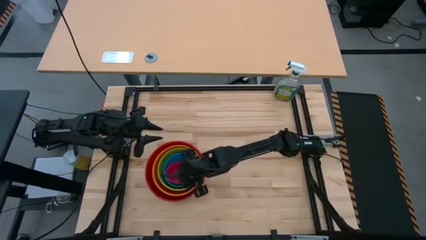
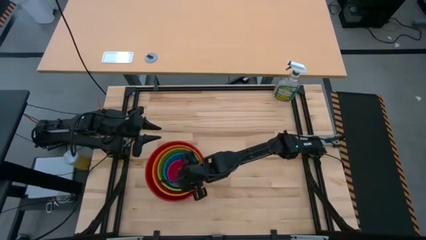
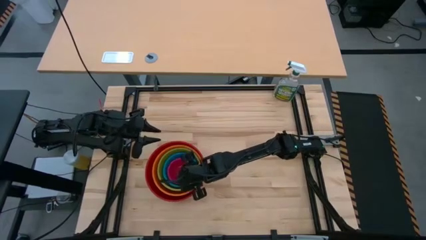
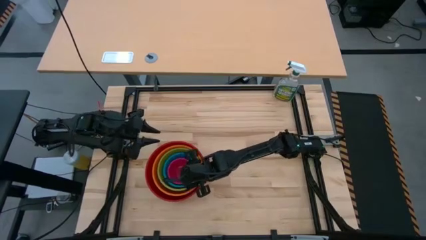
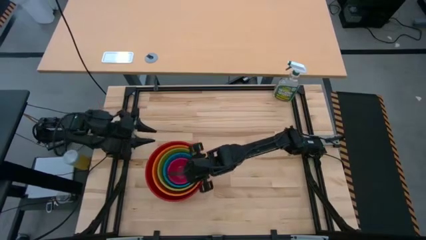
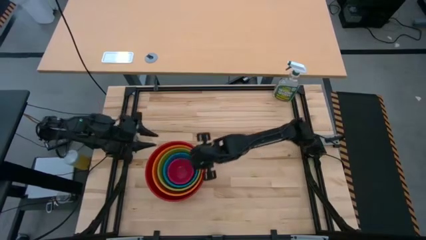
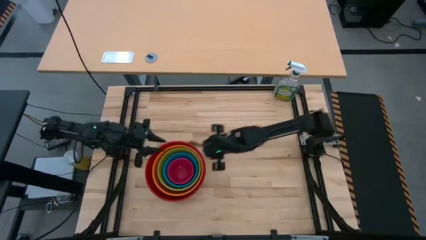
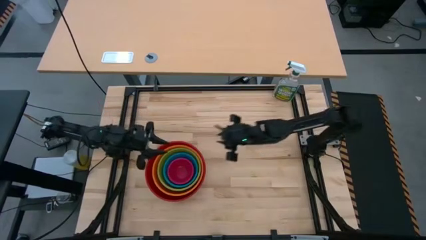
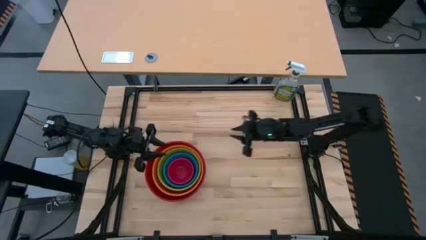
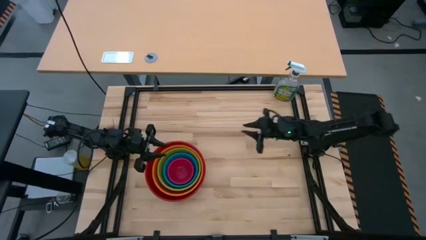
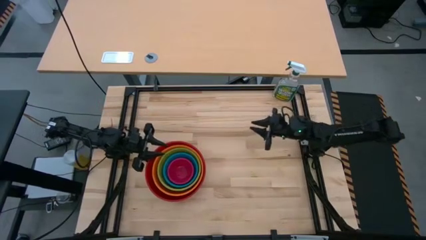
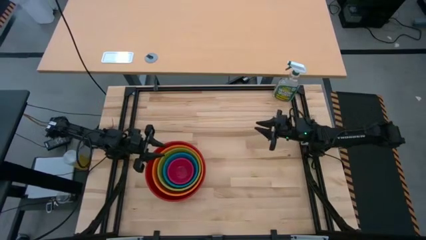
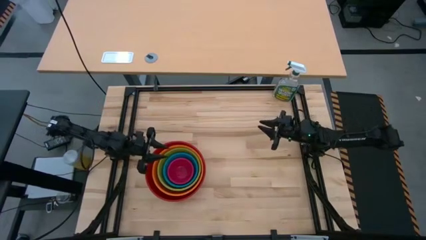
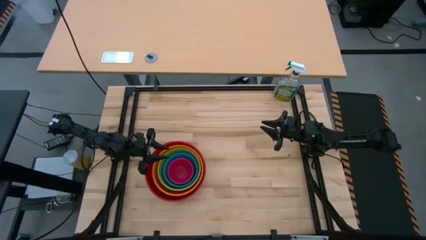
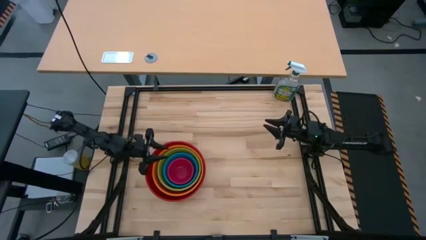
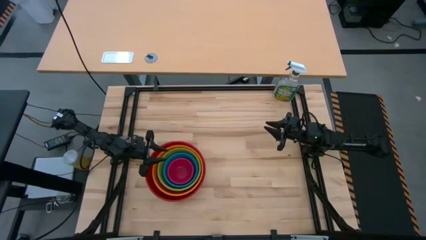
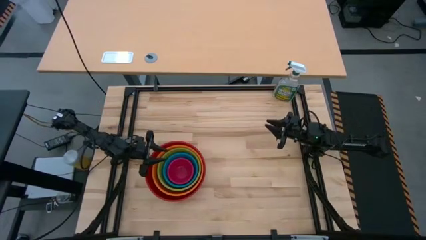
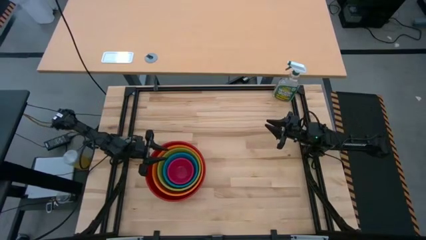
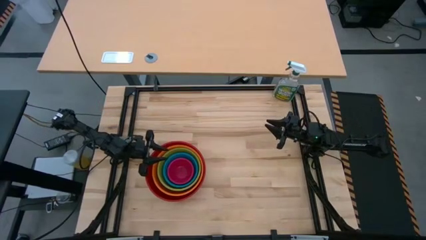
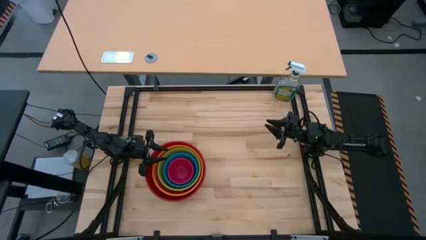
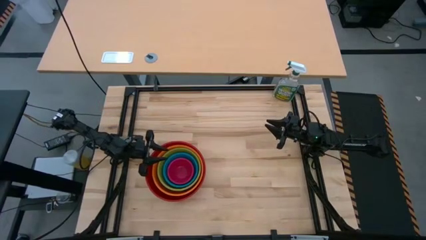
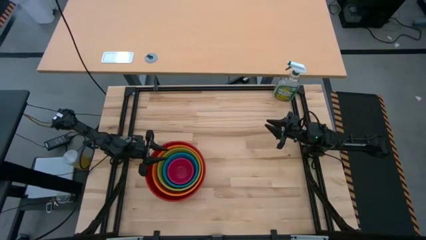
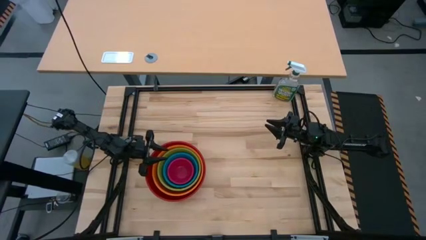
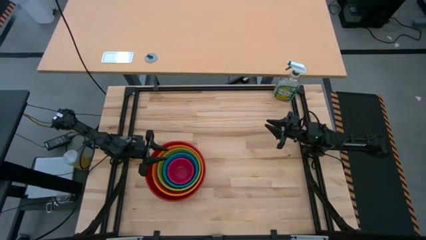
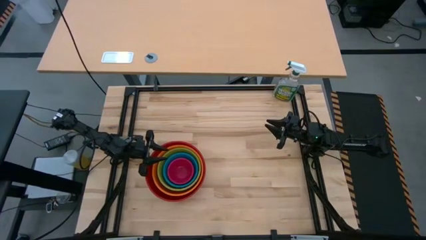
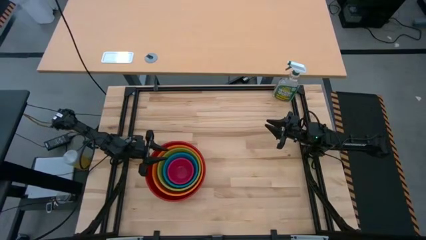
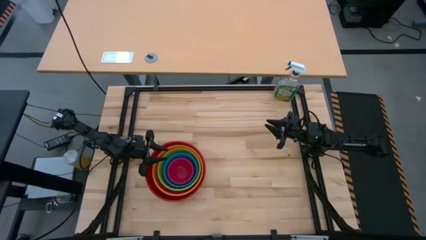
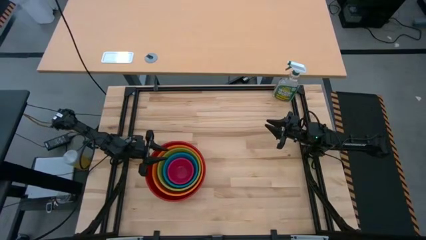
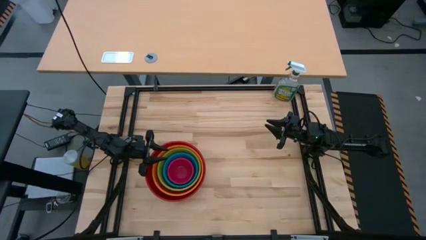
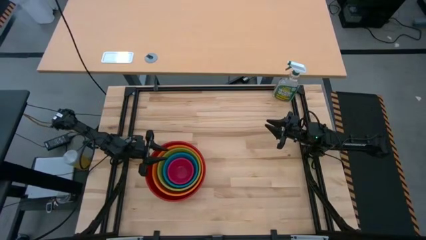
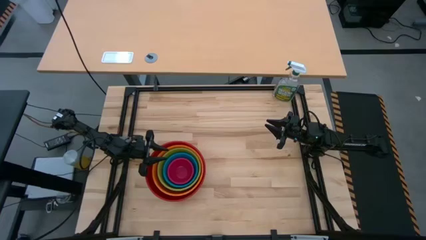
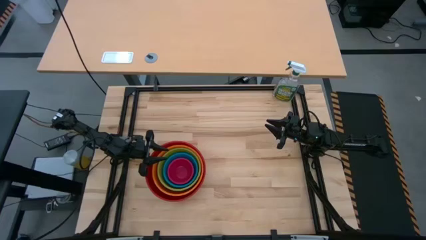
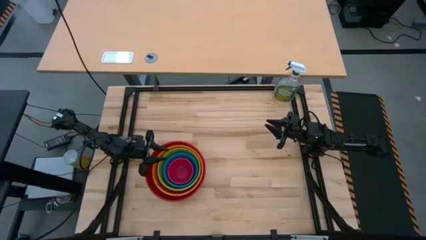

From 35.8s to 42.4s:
Return to Home Position

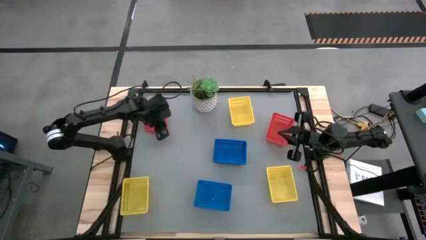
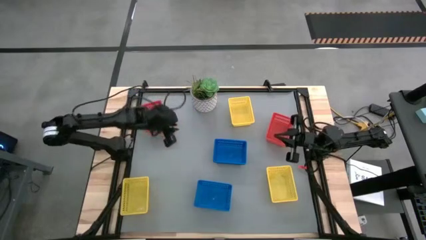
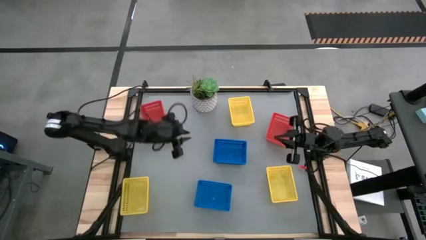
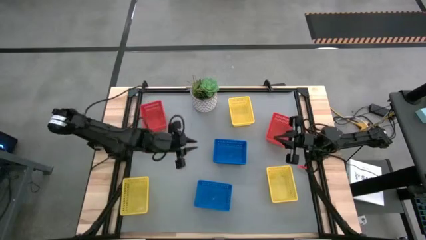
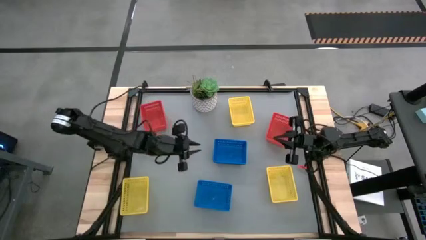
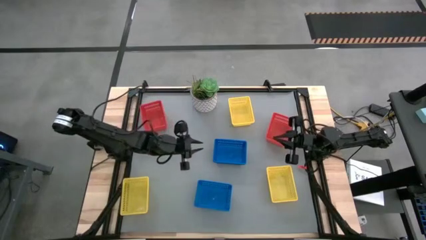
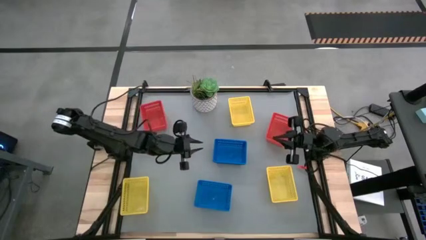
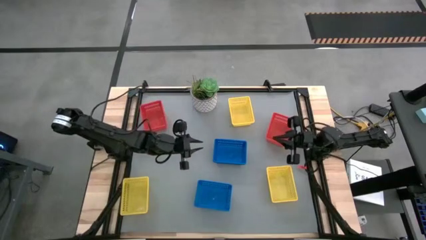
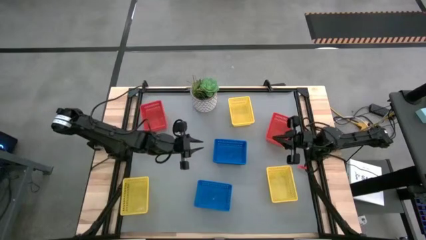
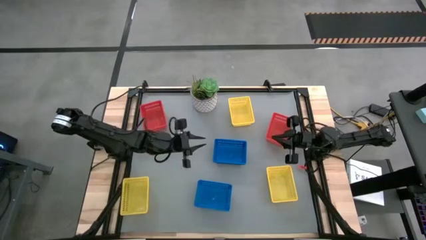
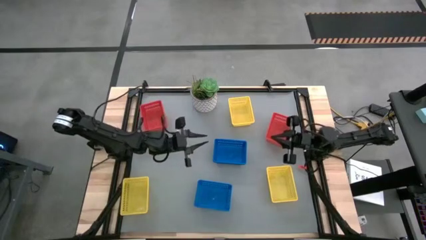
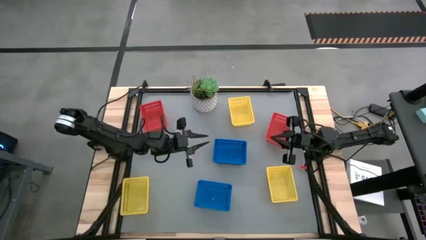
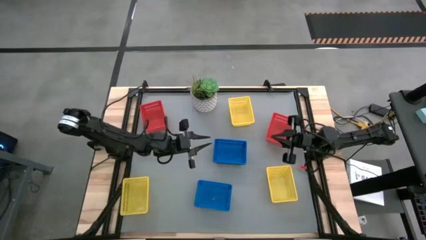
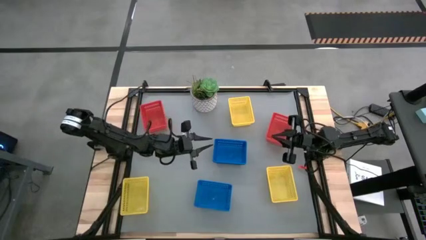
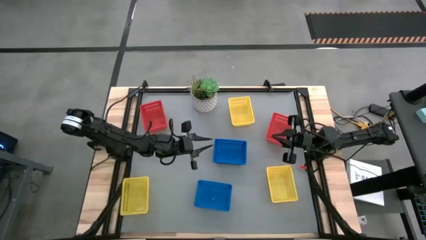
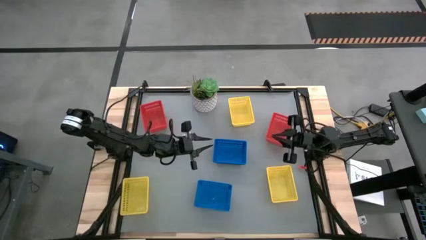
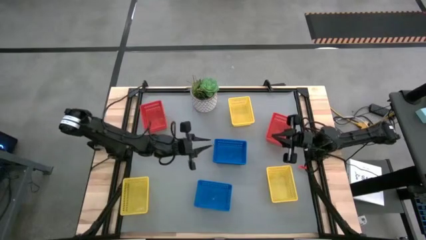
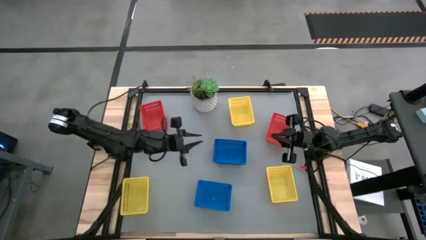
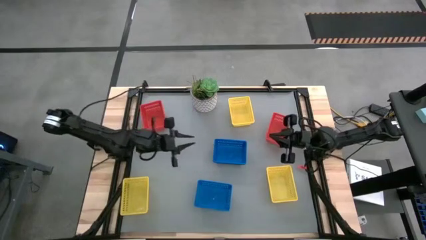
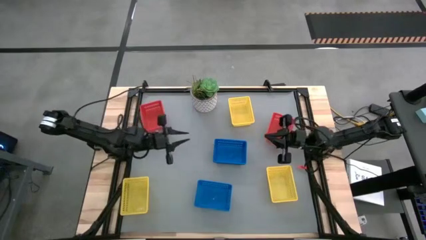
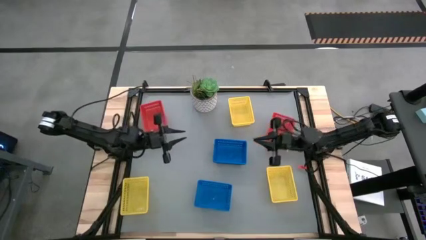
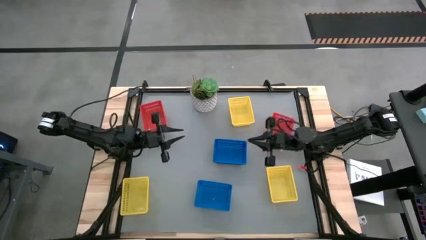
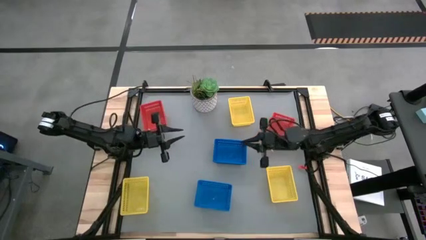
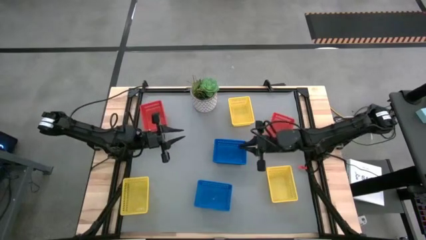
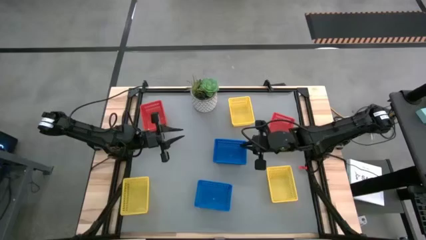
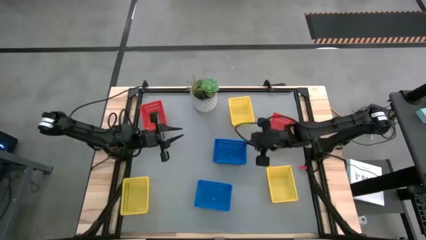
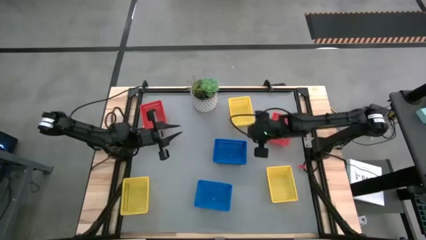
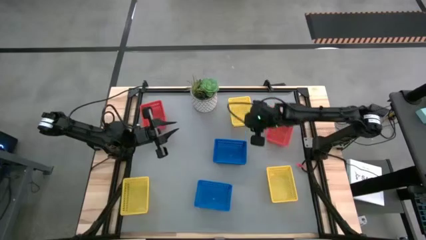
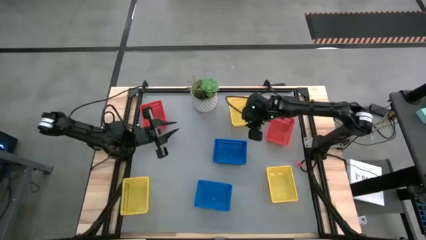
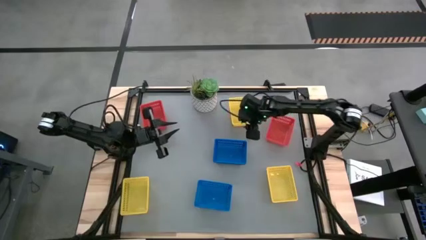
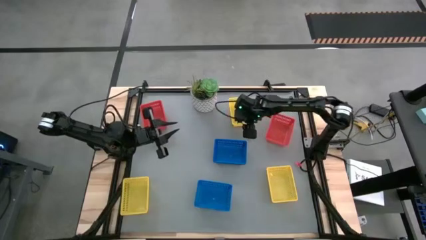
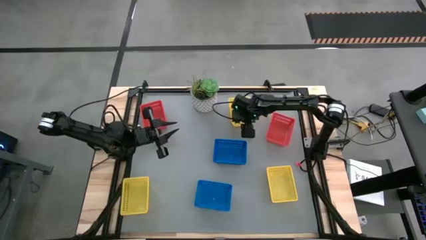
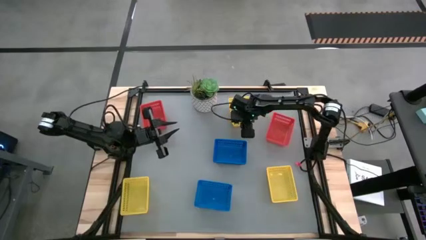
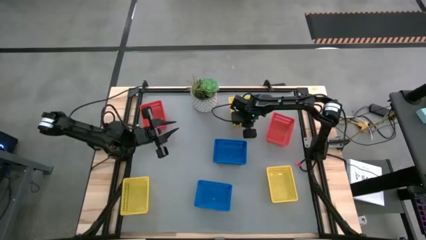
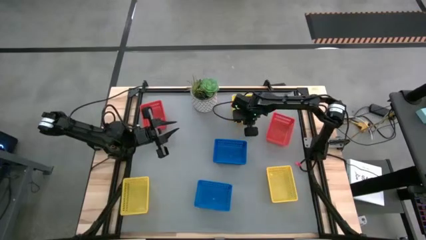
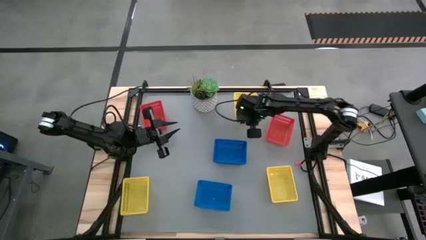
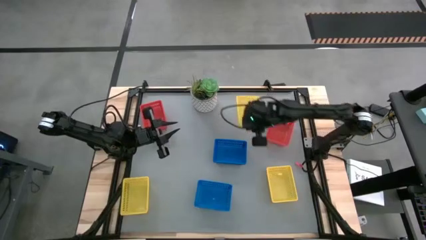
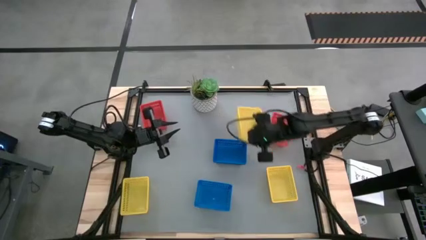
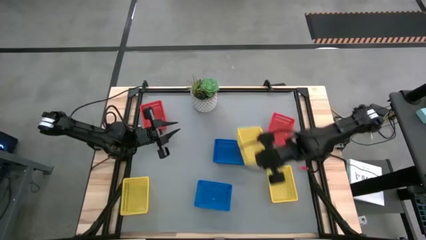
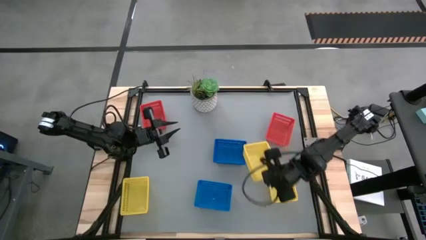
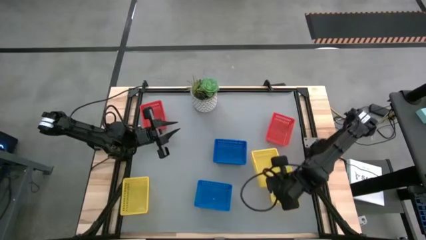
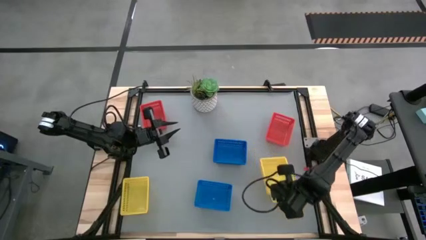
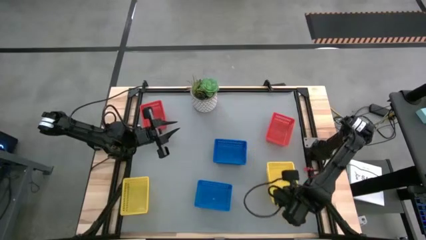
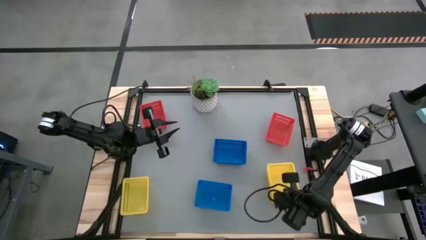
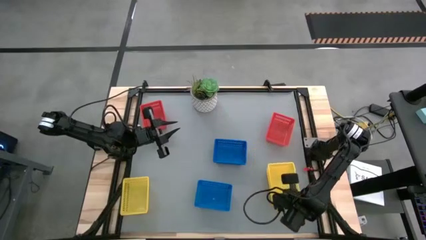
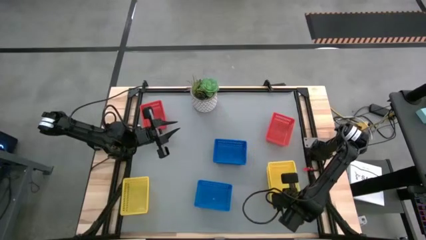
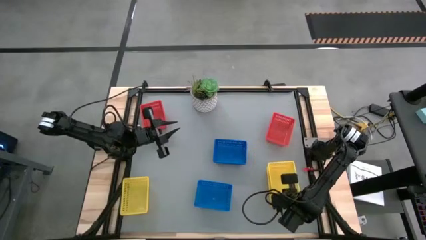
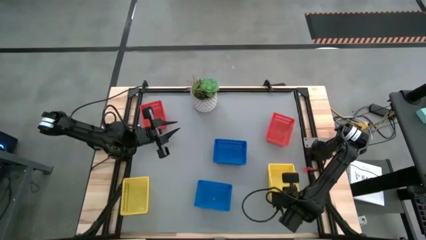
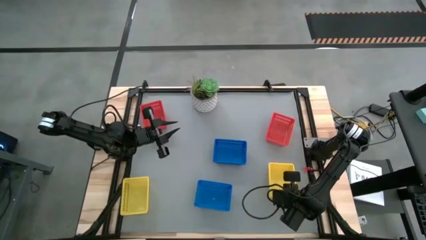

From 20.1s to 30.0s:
Stack the top yellow basket on the bottom right yellow basket
